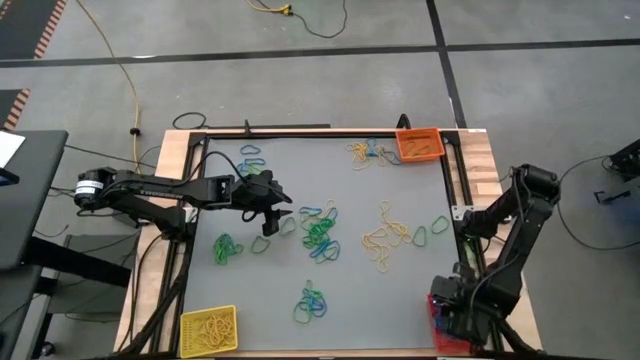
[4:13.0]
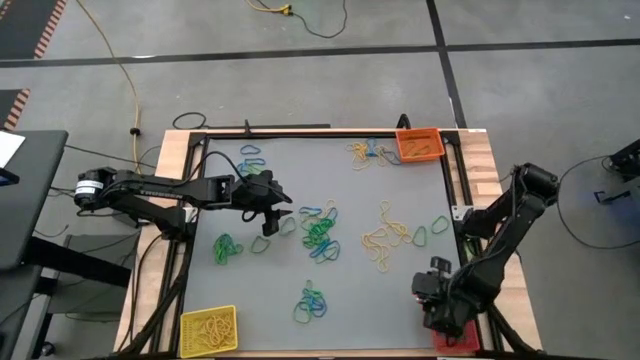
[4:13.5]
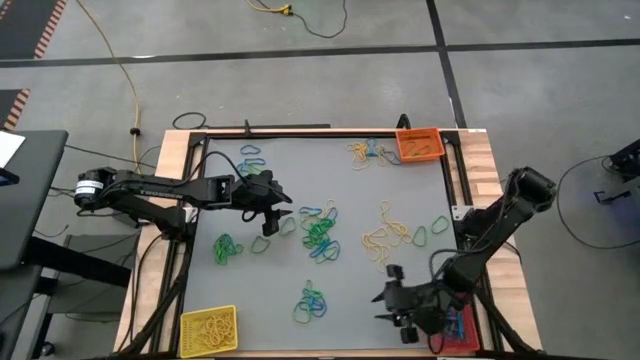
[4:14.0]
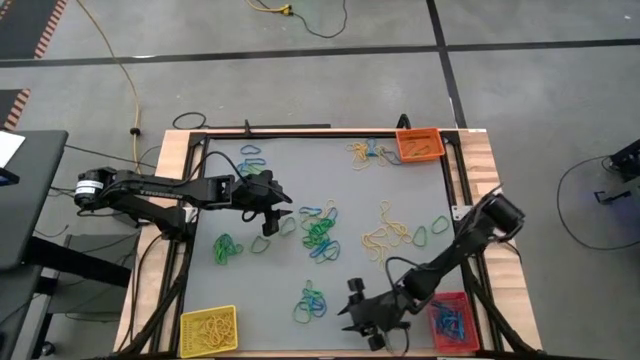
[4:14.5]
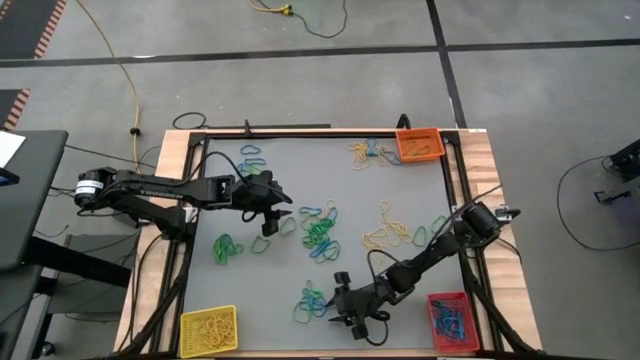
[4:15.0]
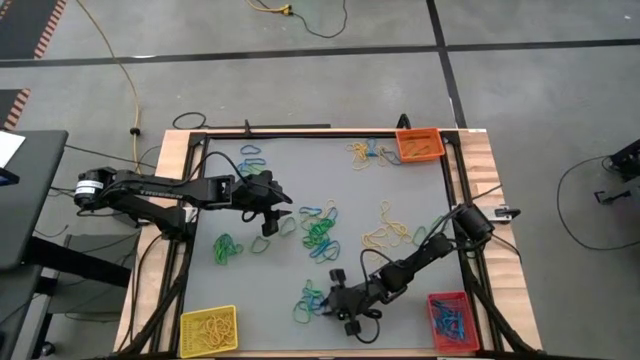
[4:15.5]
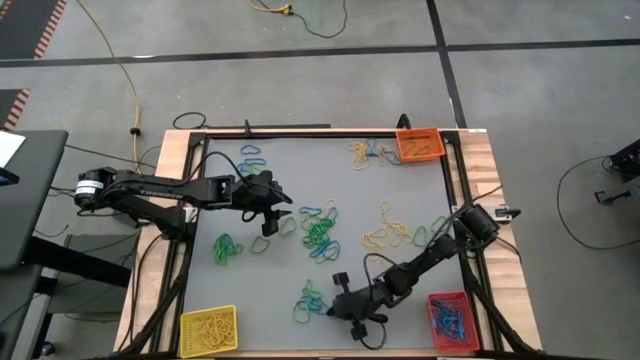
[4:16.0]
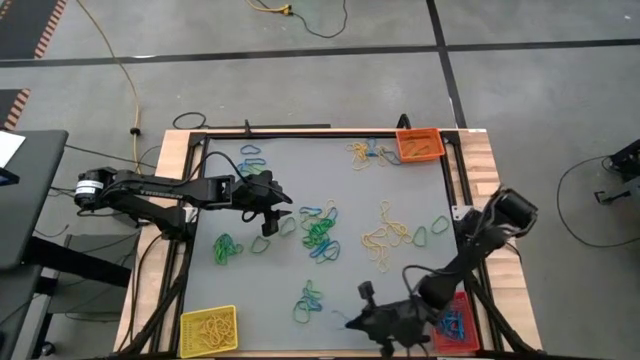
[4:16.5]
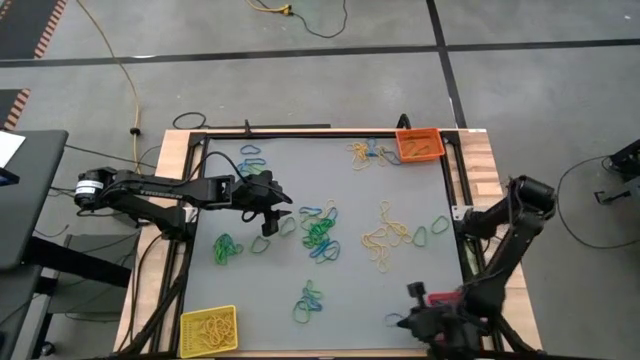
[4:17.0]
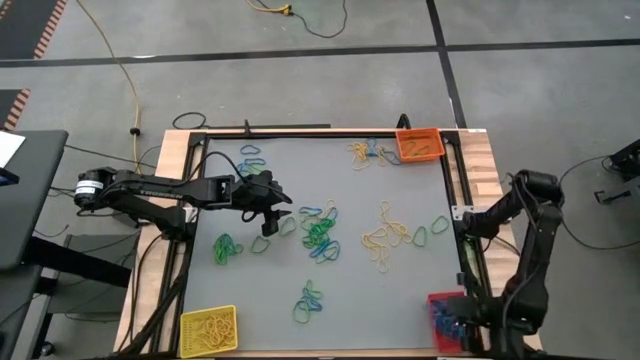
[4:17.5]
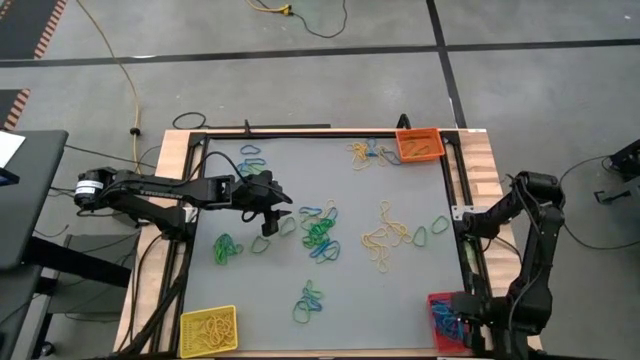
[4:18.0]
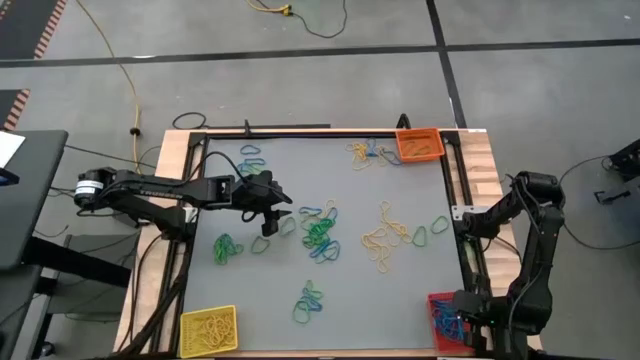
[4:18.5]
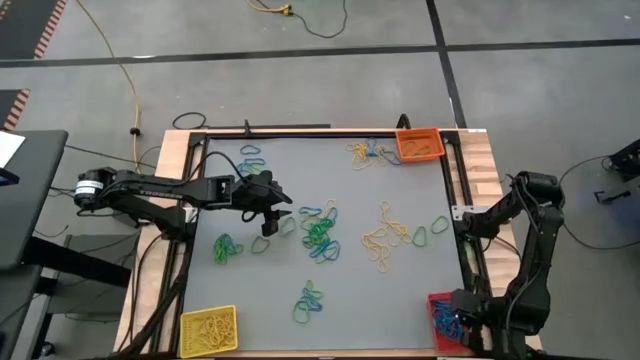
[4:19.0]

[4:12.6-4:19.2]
Task: Sort rubber bands into baskets
Put the blue rubber band into the red bin

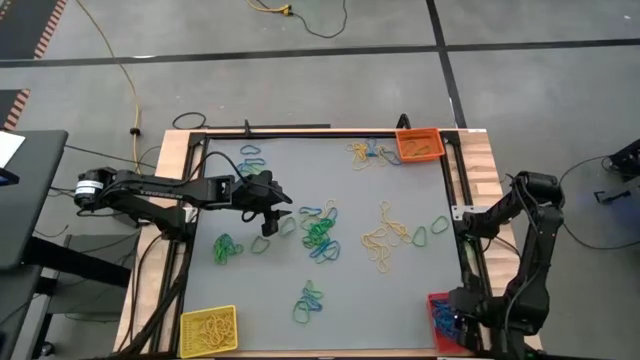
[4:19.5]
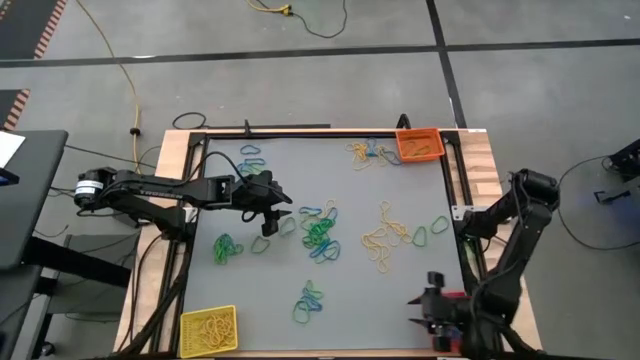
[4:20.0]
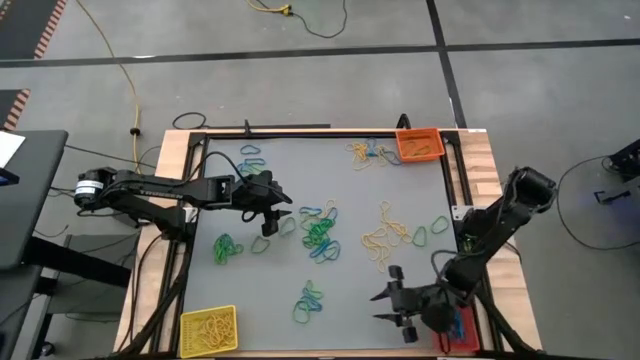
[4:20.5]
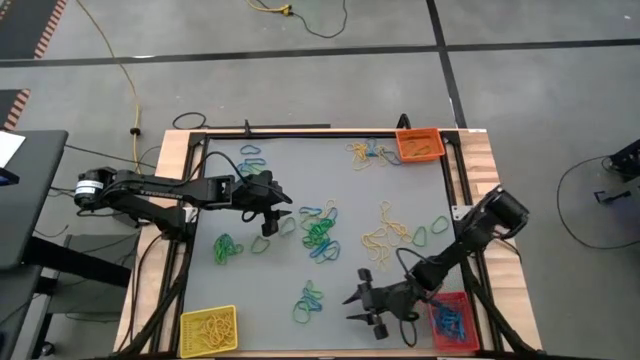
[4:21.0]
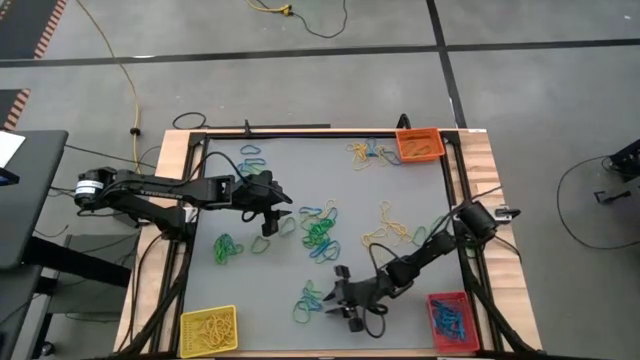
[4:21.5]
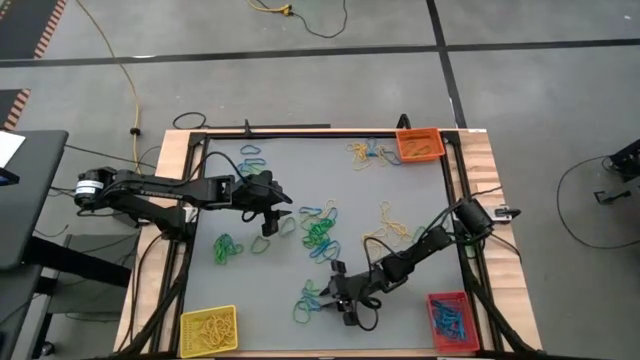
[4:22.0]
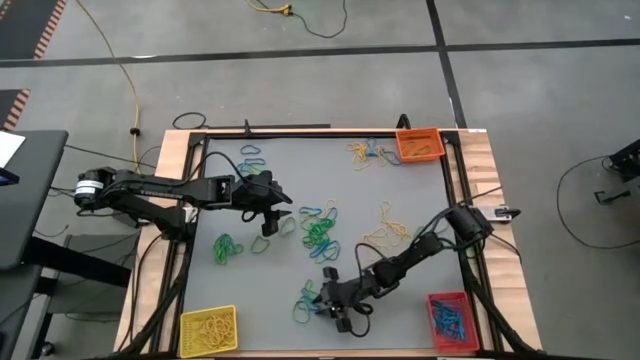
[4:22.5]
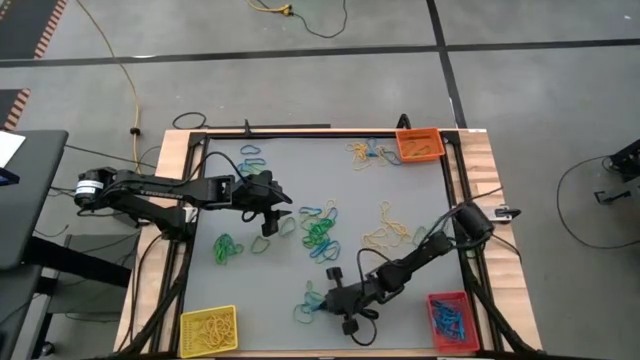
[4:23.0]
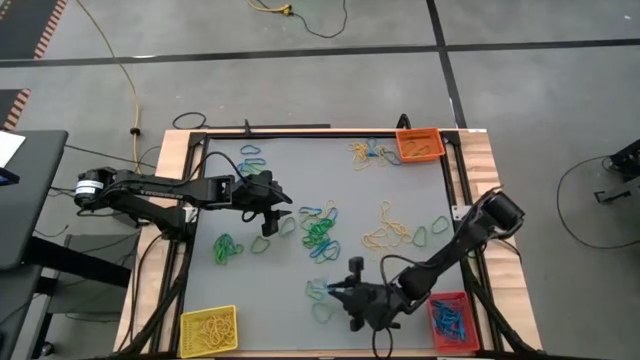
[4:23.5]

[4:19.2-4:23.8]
Put the blue rubber band into the red bin

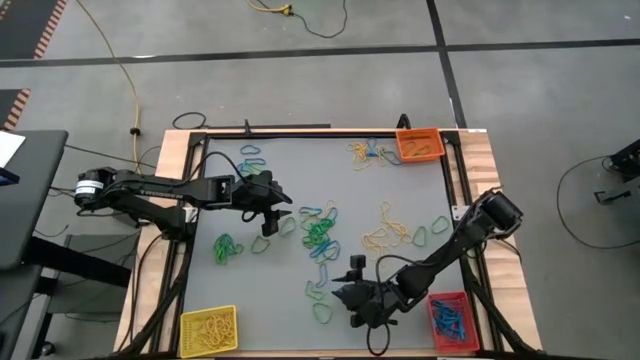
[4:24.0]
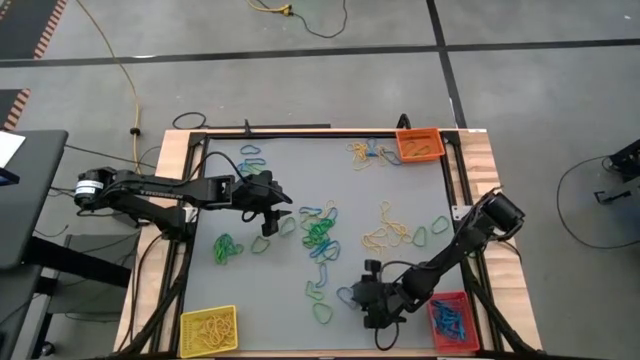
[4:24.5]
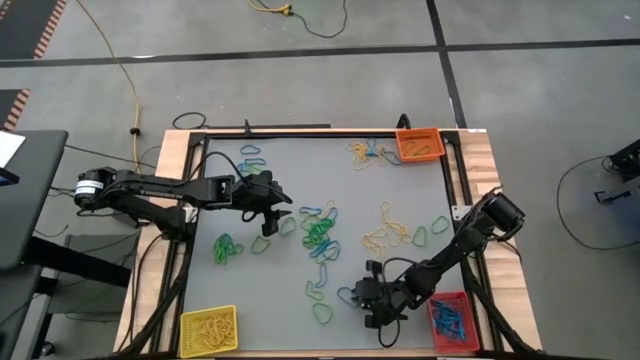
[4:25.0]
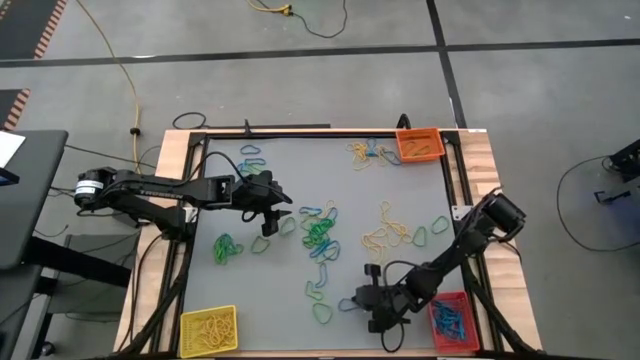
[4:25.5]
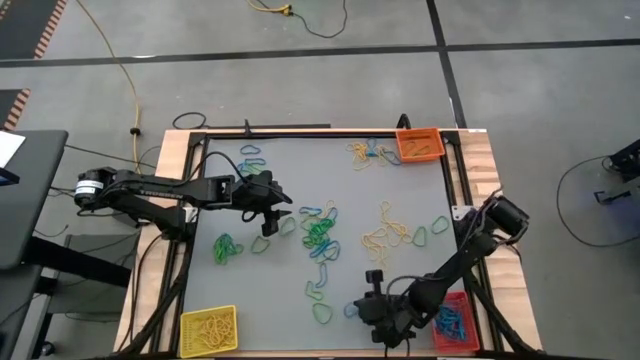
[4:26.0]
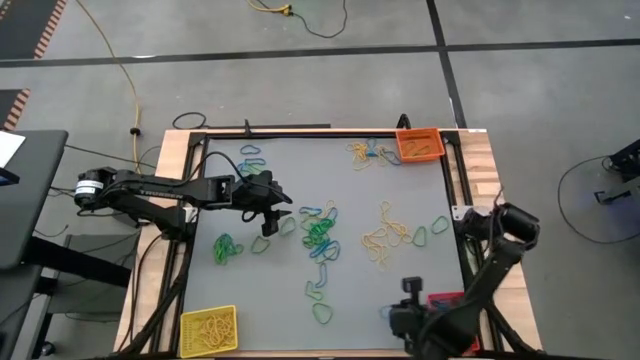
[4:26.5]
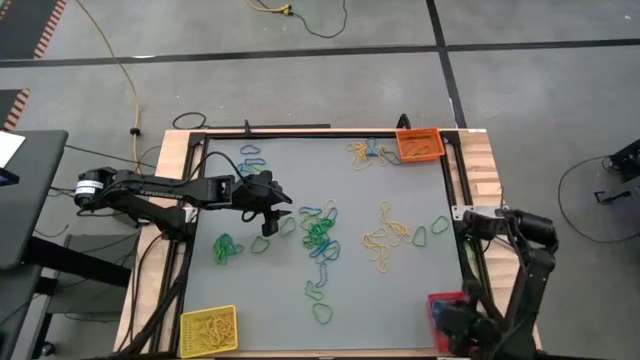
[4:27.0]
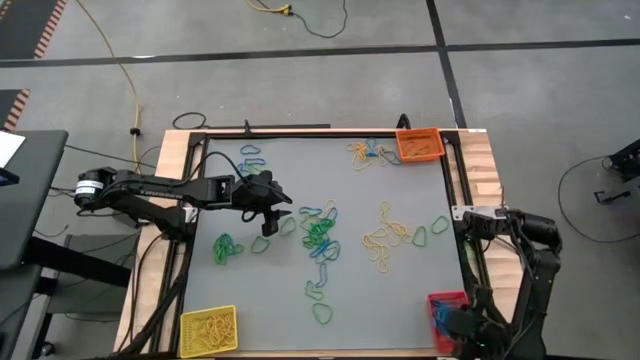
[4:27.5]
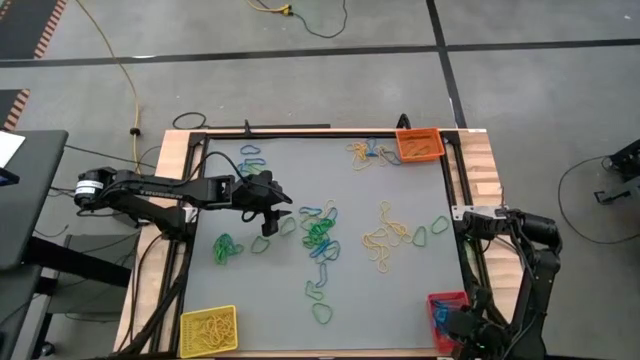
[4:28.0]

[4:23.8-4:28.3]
Put the blue rubber band into the red bin

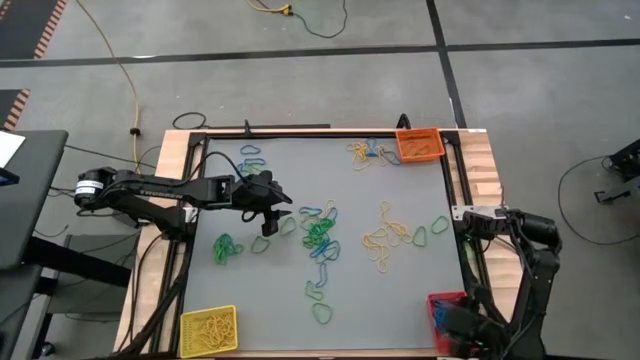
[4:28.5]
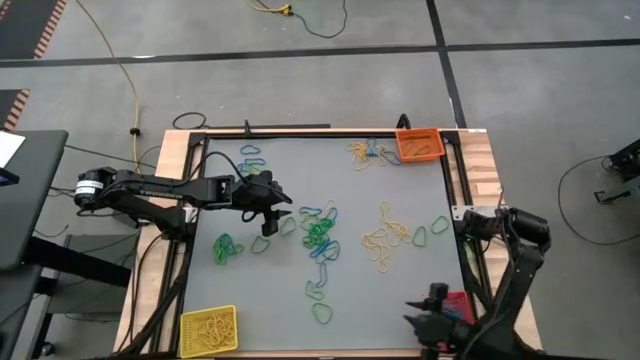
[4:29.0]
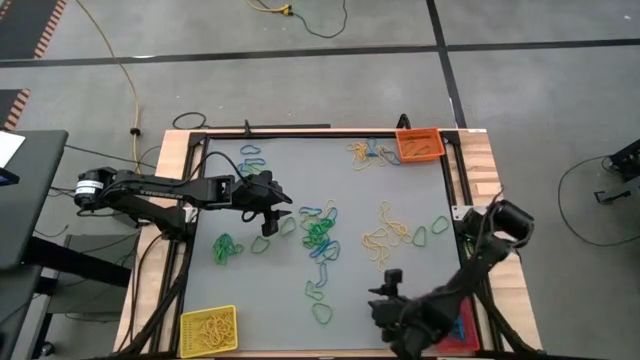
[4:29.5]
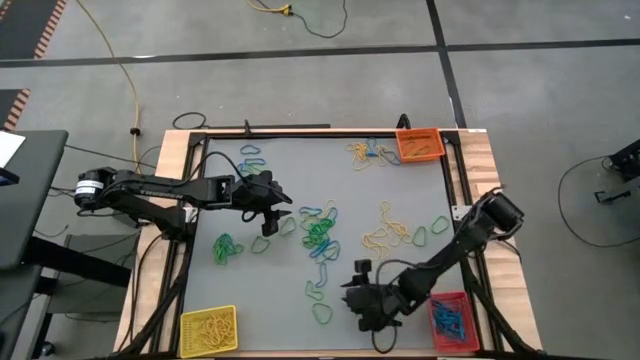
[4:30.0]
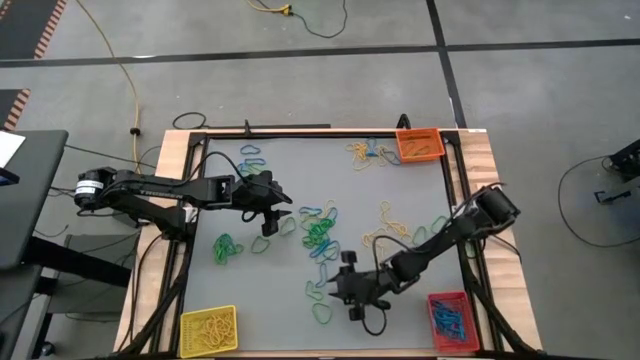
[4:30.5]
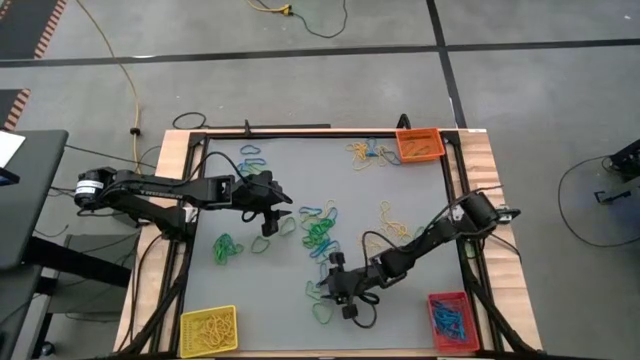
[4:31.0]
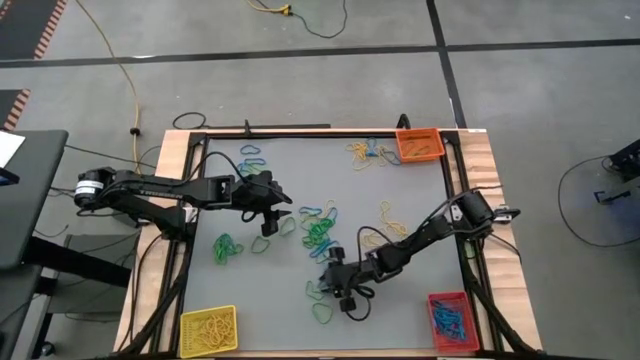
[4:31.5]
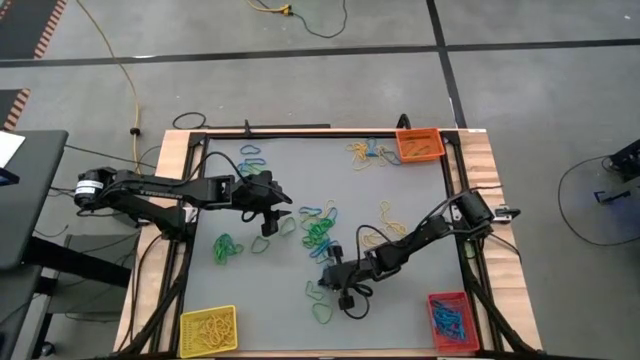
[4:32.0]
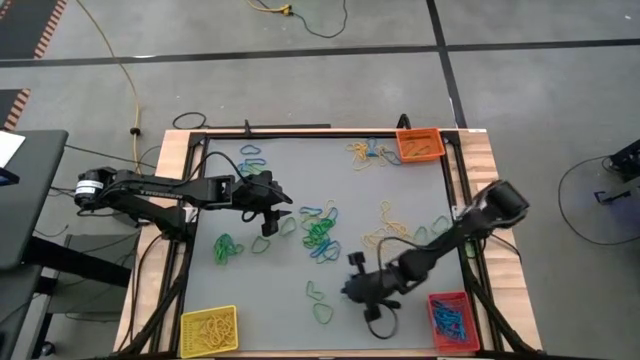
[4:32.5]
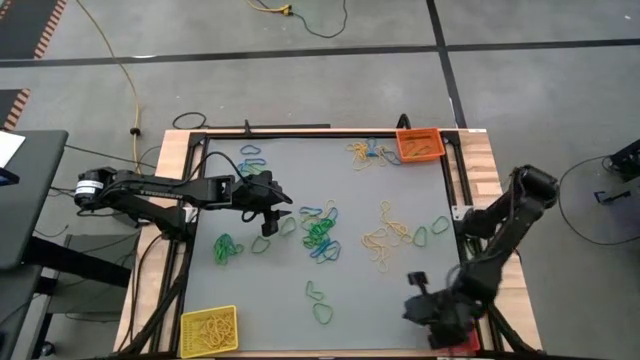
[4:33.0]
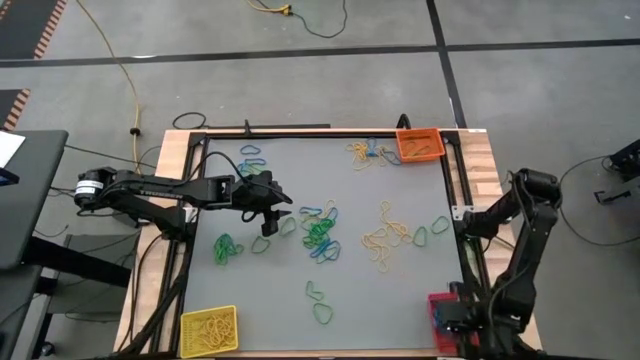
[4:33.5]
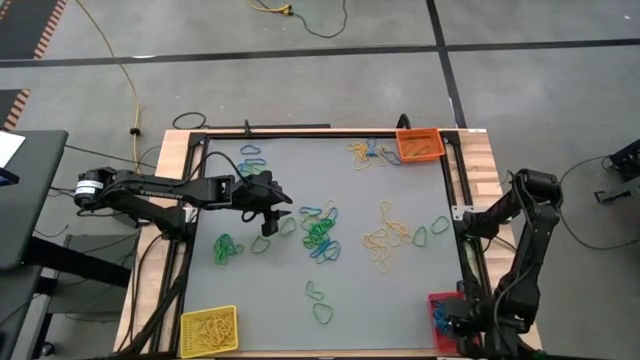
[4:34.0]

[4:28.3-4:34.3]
Put the blue rubber band into the red bin
